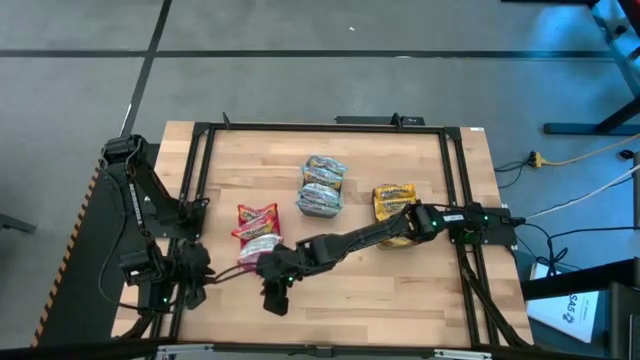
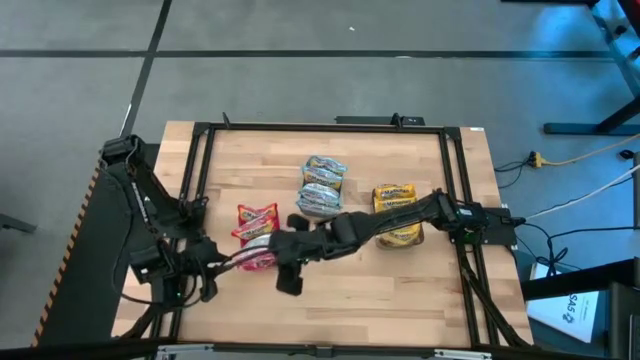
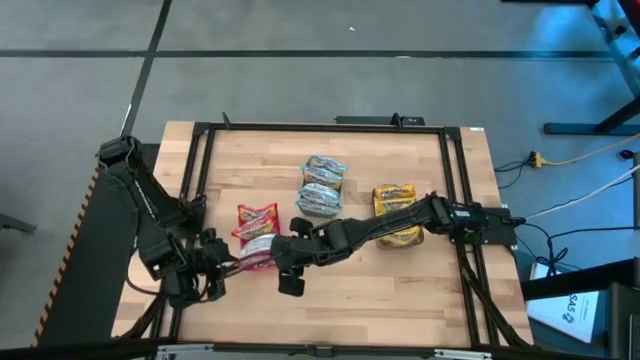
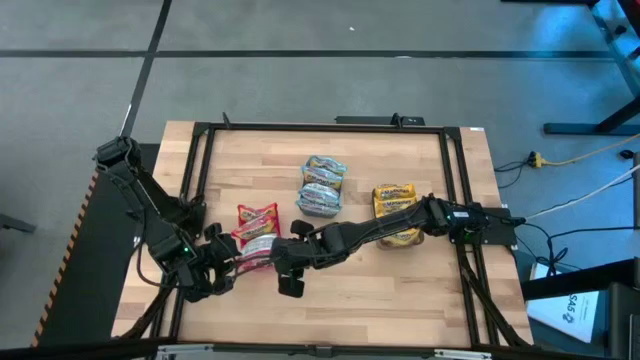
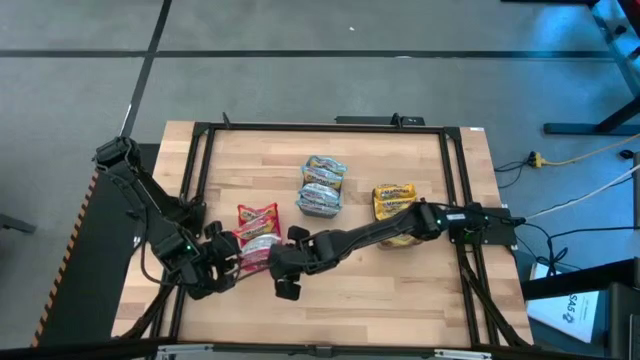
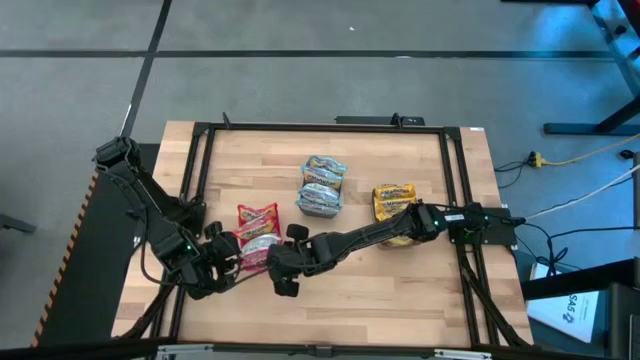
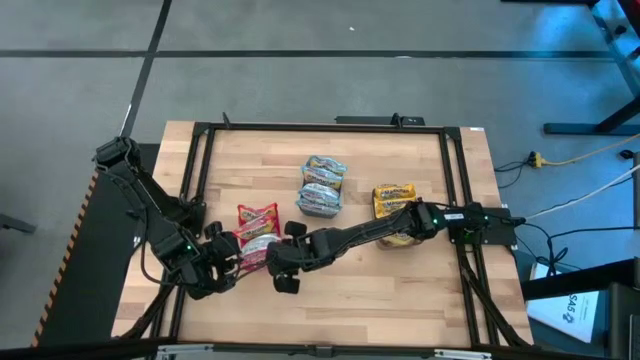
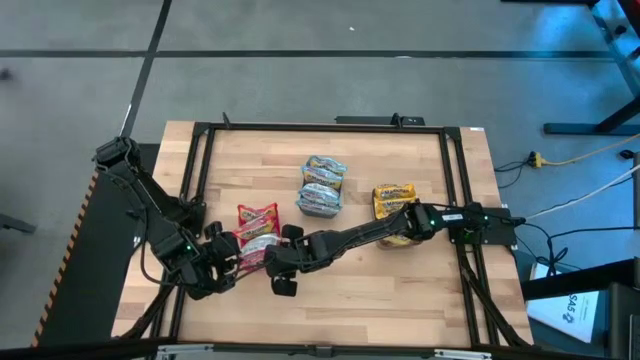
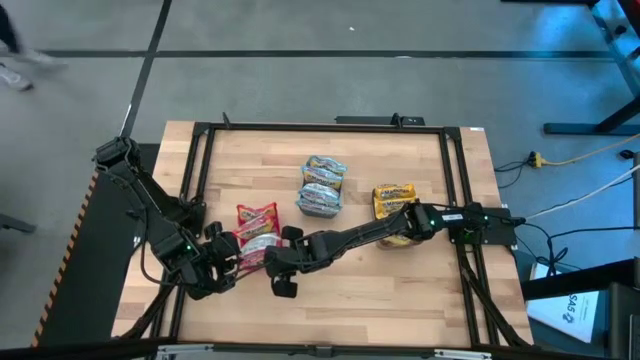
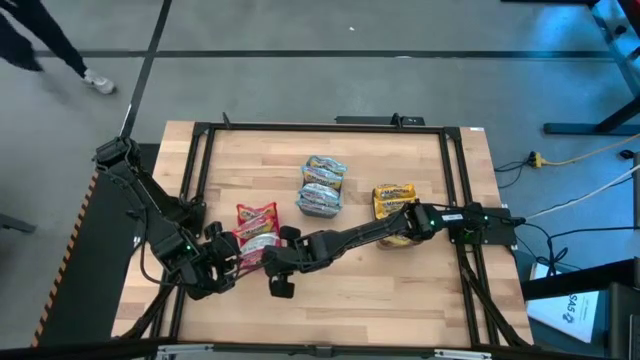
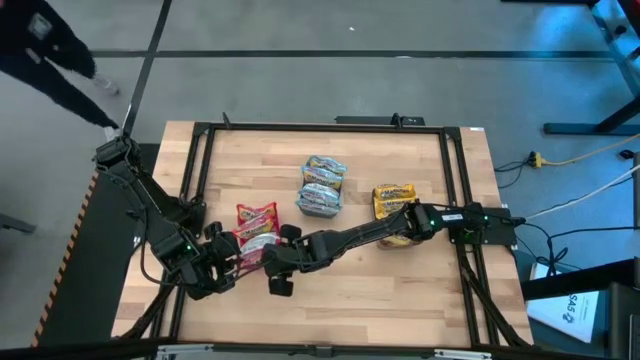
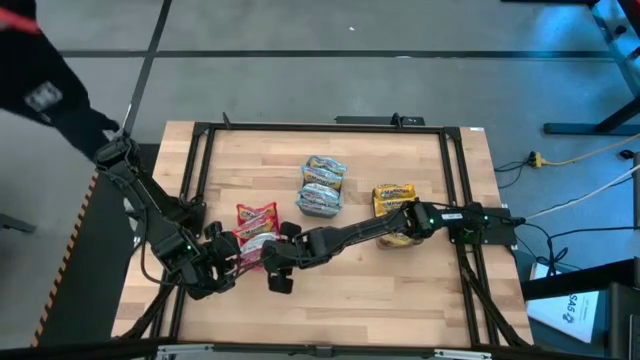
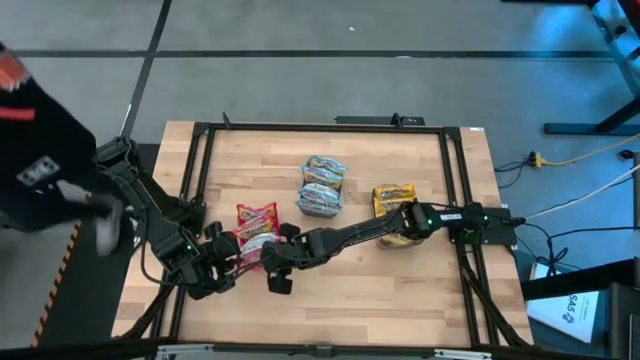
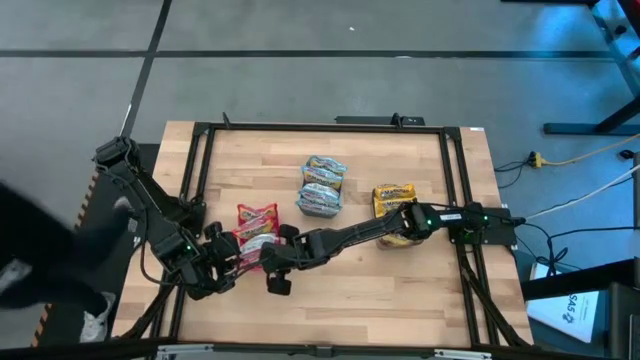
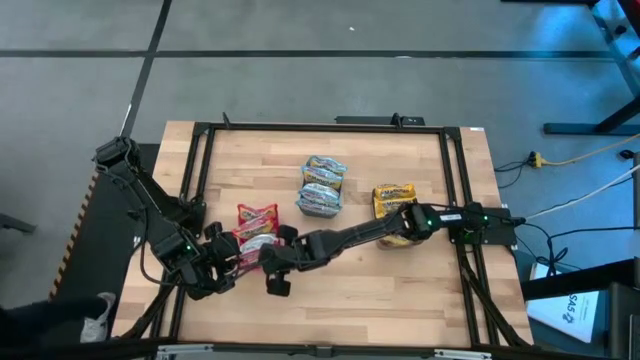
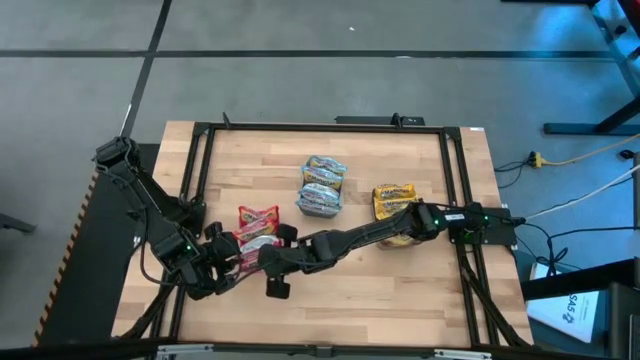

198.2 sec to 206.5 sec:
Task: Sort Maruchan noodles
Adjust the red noodle packs in the red bin

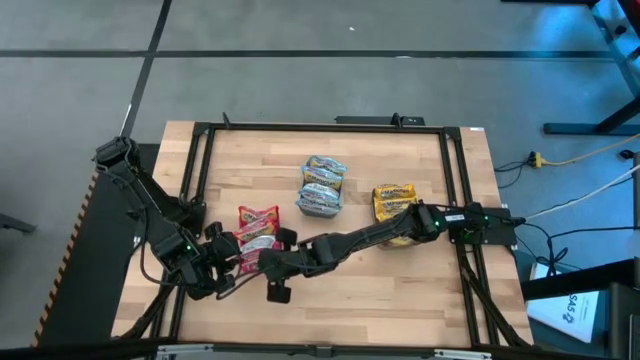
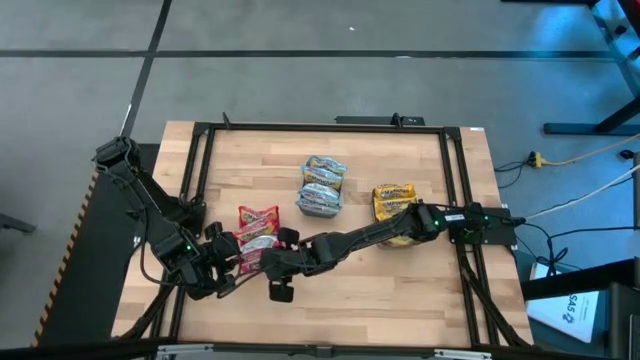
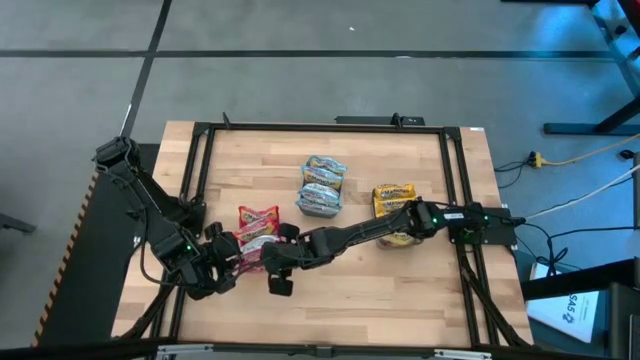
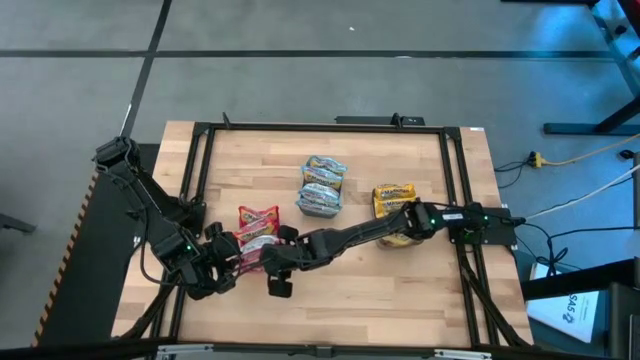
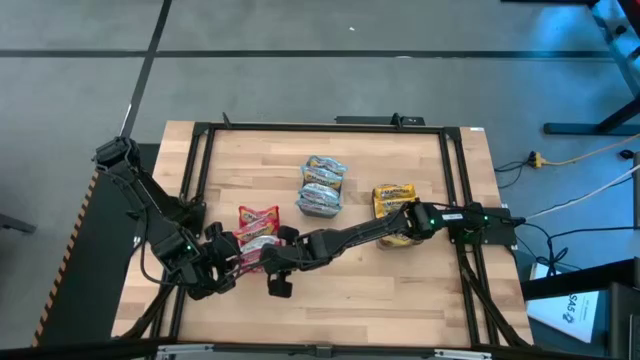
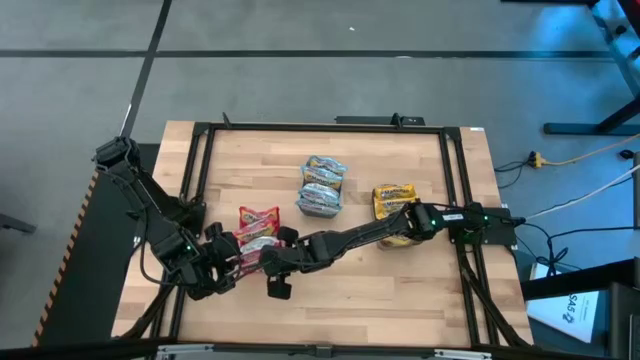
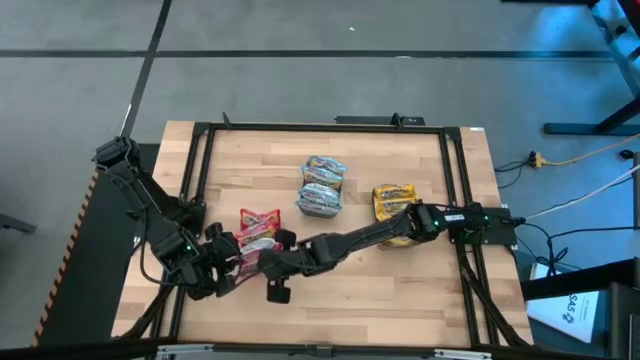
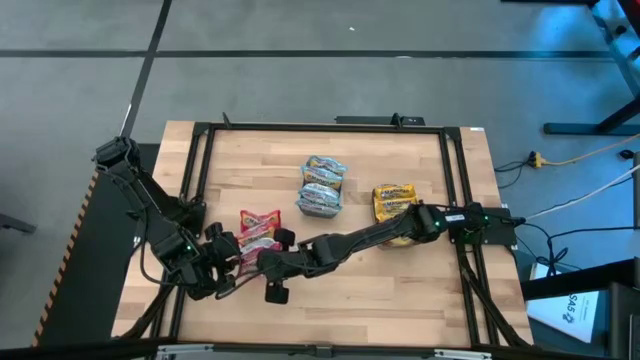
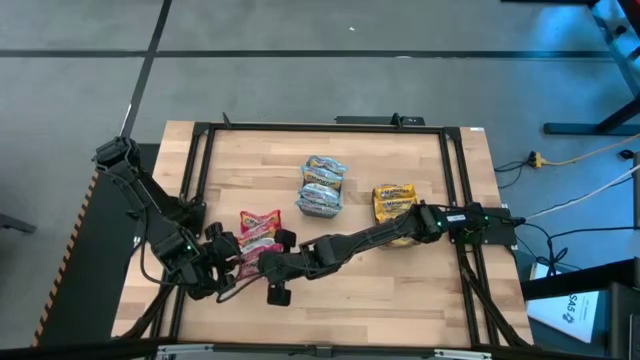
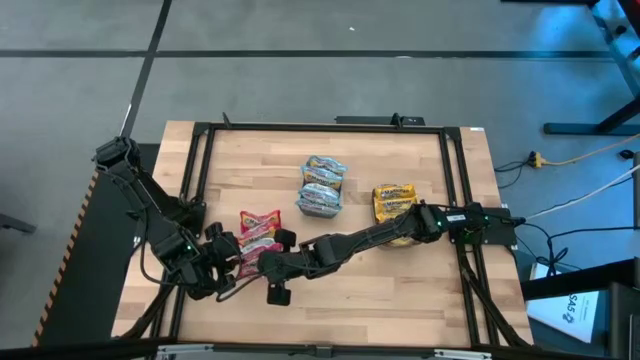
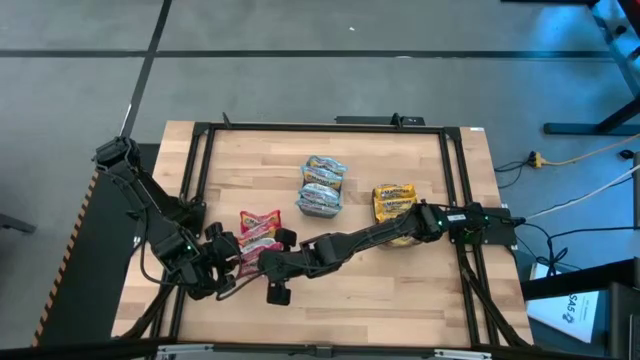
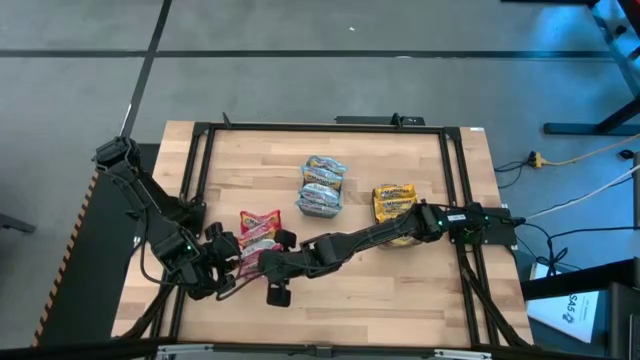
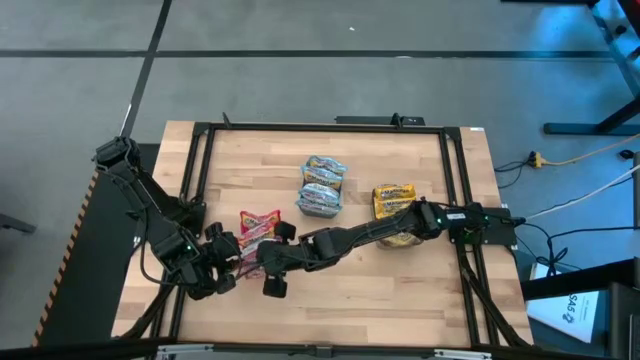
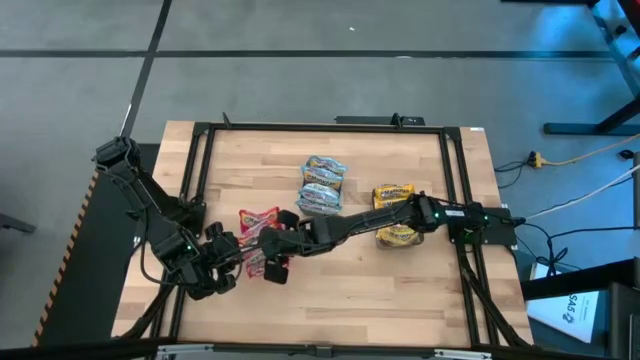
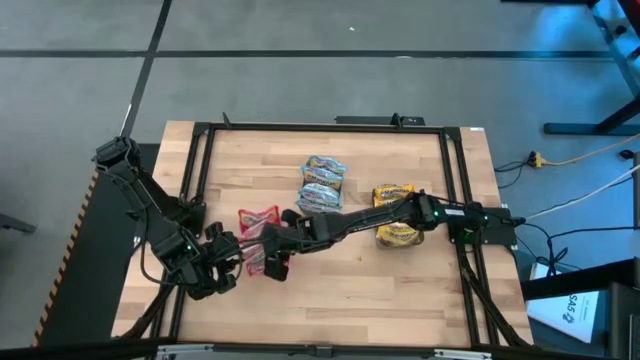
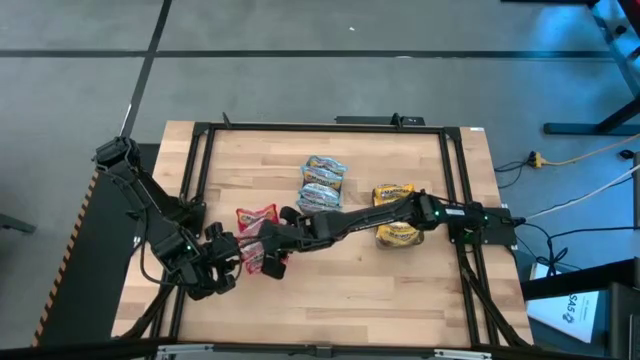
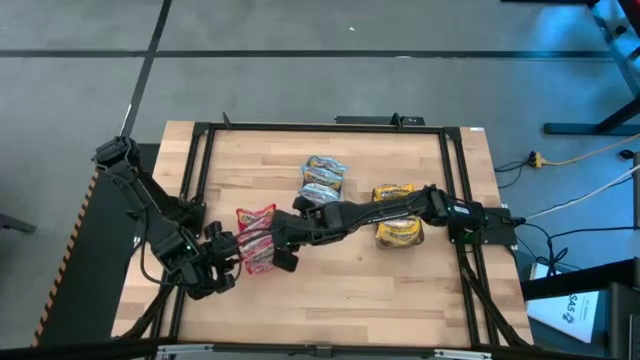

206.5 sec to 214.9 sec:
Adjust the red noodle packs in the red bin
